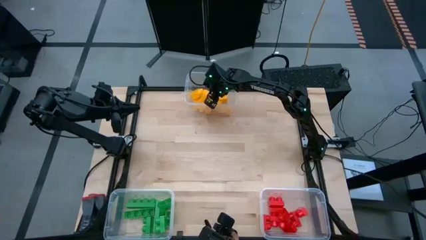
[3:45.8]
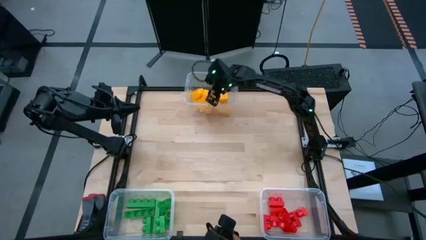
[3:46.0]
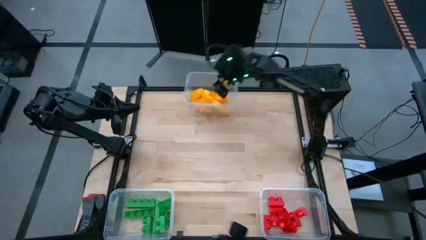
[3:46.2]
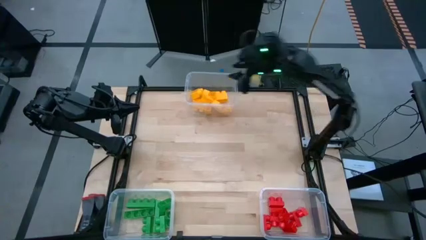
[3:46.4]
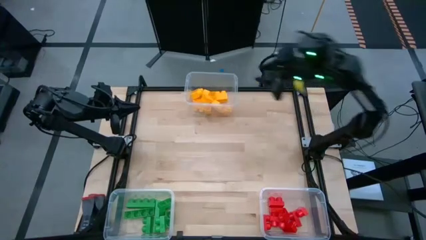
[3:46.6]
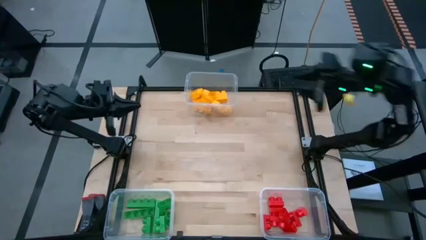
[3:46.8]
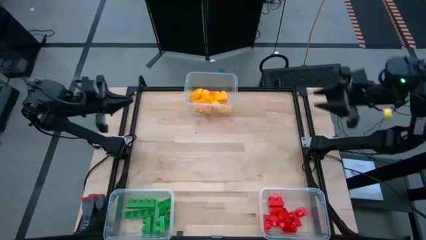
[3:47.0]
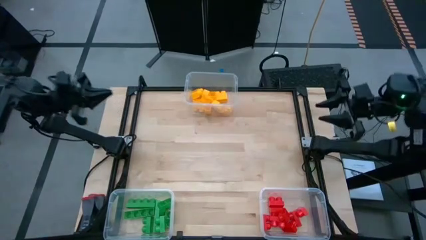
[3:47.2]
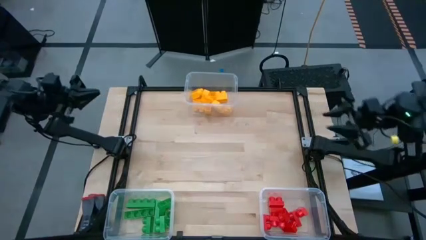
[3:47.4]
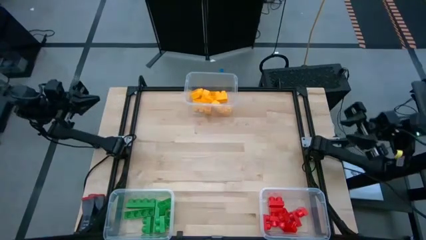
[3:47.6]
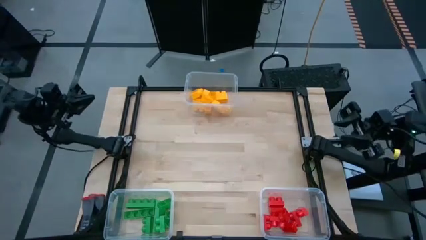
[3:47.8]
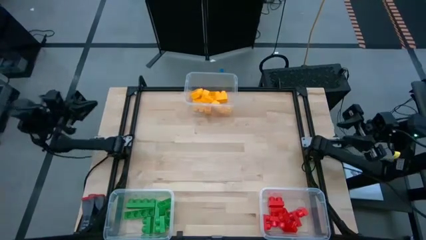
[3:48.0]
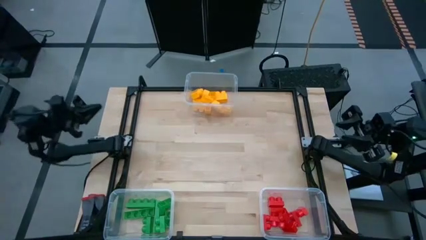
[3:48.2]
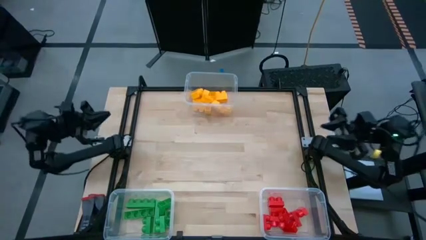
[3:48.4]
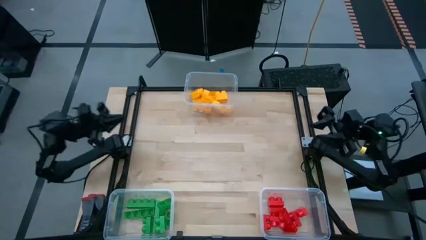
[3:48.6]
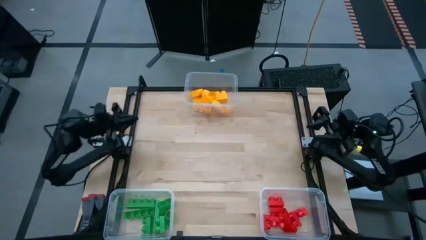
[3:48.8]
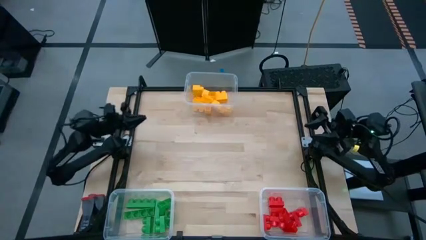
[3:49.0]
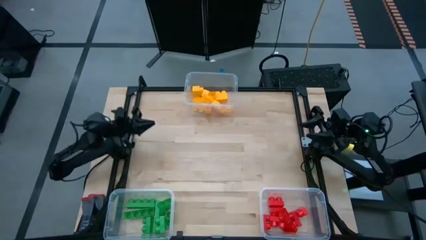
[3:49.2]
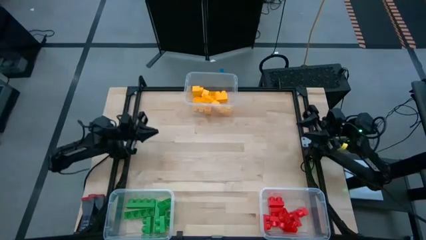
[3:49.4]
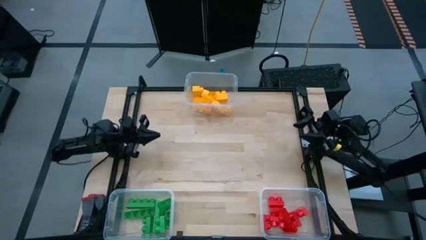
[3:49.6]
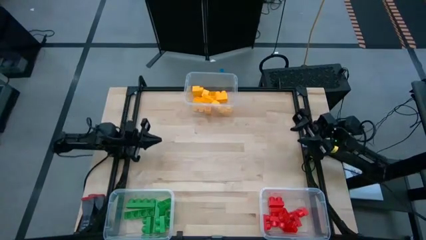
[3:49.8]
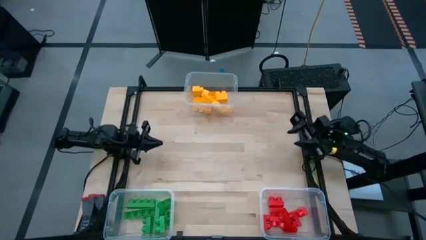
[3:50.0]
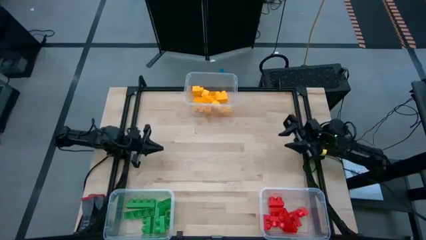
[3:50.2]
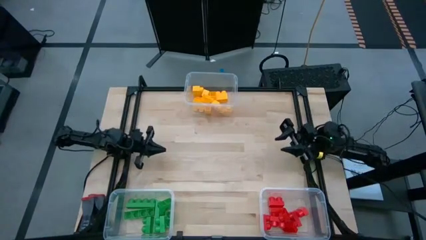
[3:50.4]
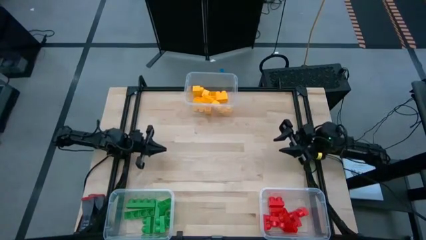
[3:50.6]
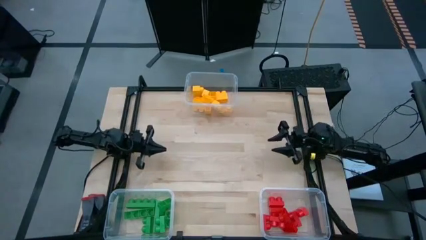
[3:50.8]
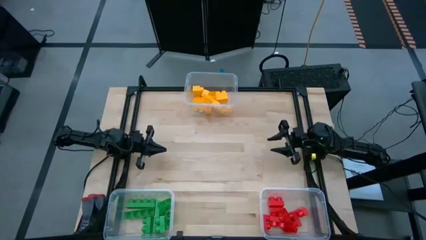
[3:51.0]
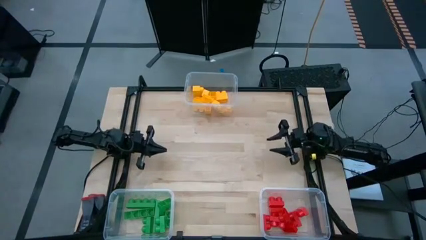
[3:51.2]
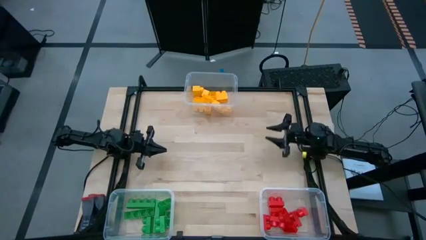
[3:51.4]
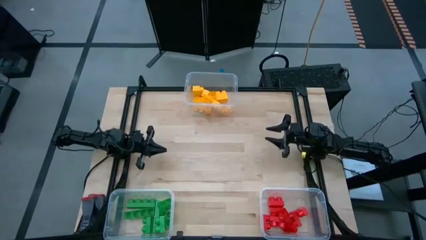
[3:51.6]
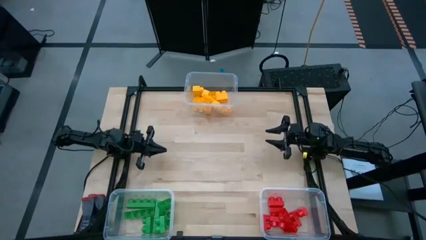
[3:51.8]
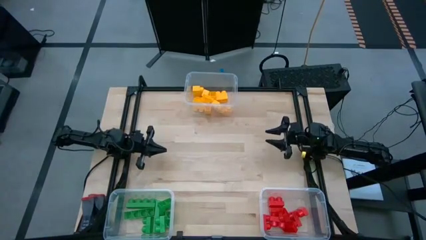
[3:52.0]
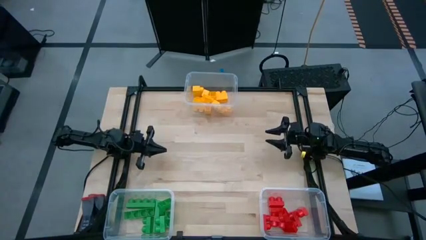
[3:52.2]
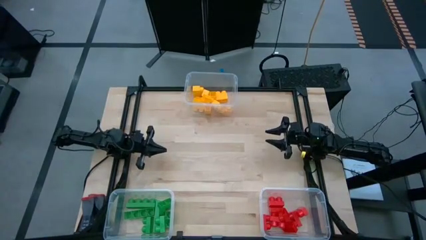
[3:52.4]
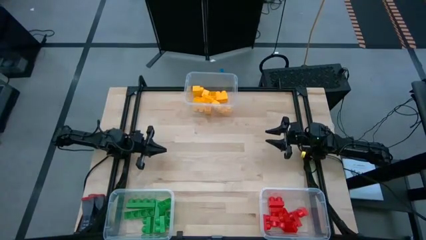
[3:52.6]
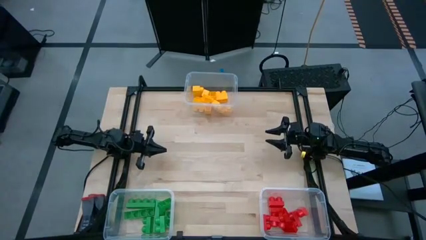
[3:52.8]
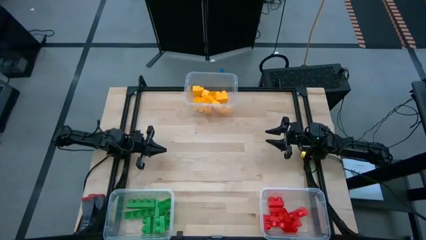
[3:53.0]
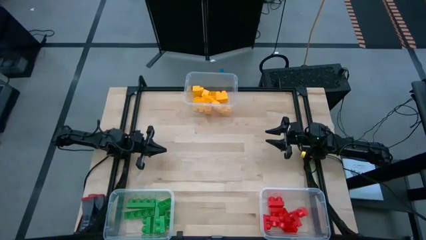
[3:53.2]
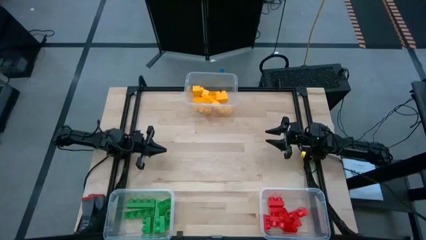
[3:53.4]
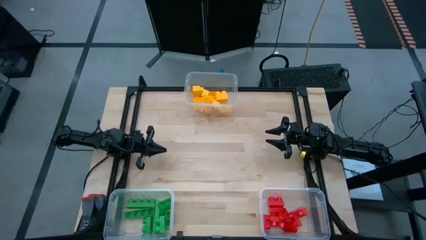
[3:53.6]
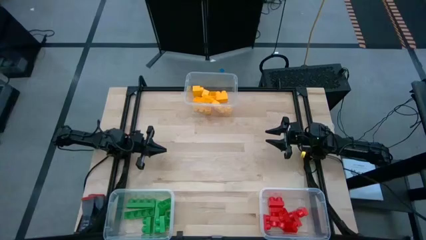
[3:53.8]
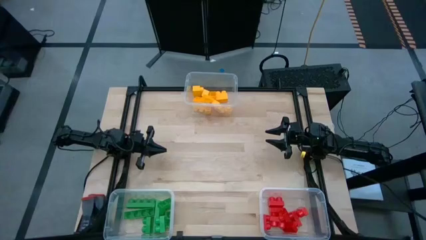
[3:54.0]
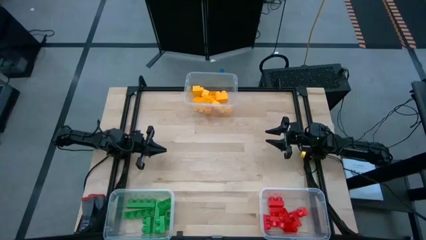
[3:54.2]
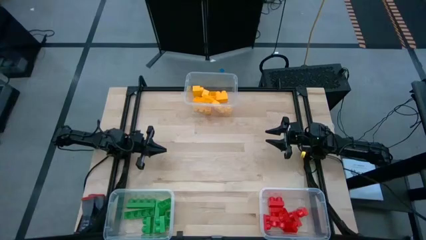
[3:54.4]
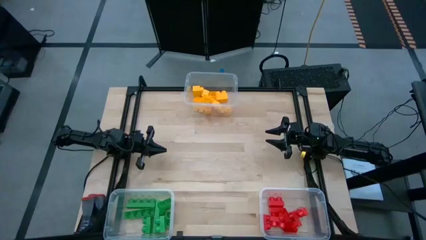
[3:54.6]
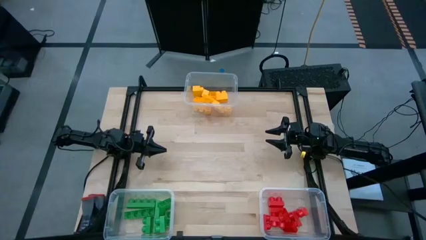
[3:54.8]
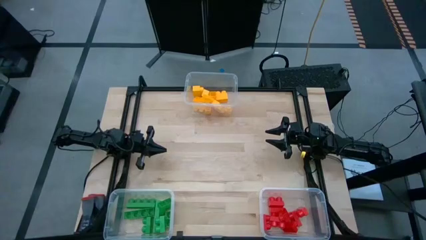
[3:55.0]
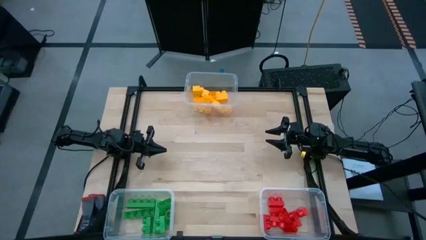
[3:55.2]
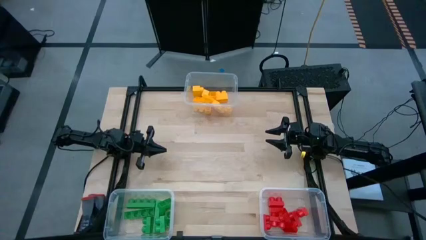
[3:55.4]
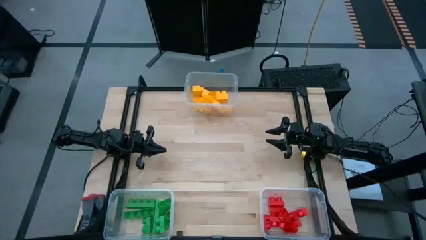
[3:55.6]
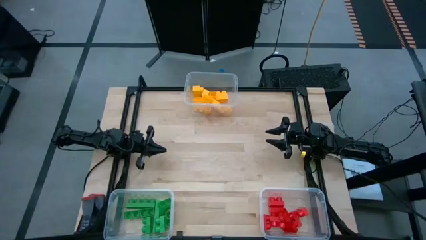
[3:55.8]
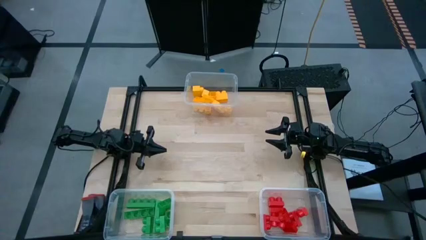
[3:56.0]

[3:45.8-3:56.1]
Task: Sort blocks
Return to Home Position

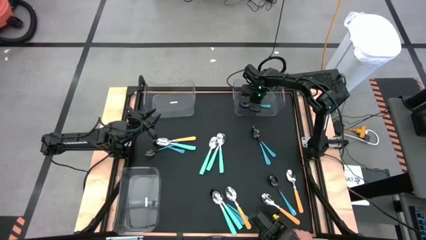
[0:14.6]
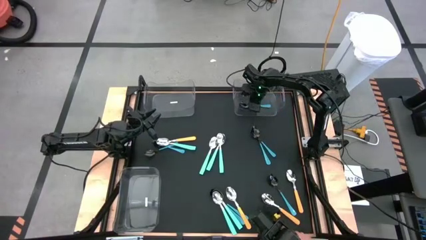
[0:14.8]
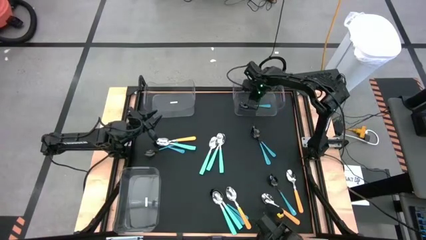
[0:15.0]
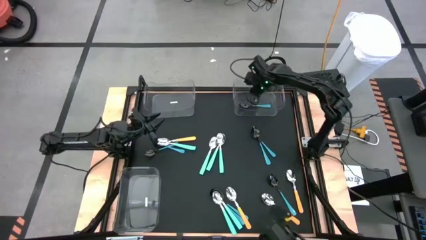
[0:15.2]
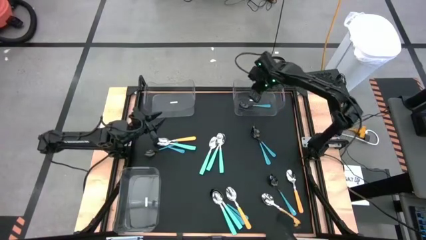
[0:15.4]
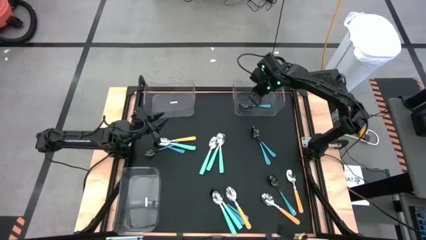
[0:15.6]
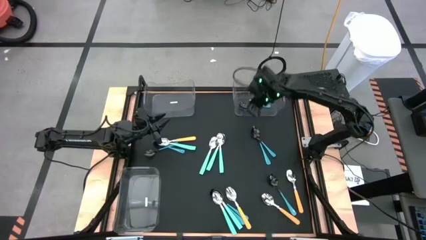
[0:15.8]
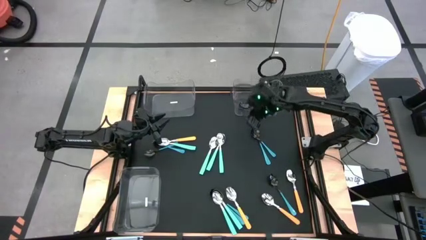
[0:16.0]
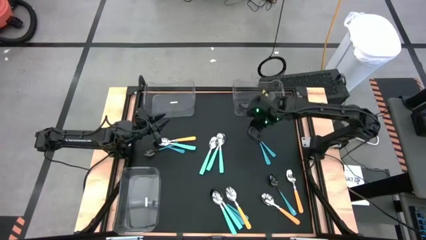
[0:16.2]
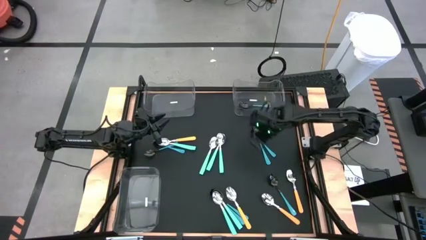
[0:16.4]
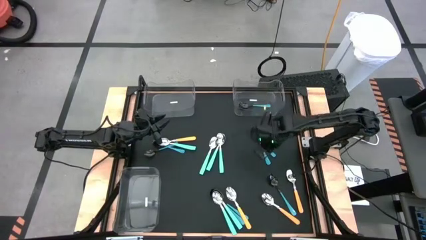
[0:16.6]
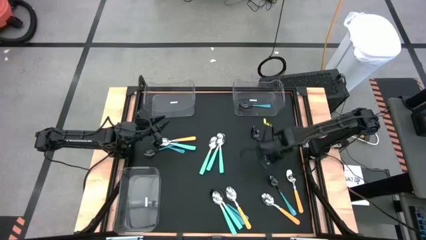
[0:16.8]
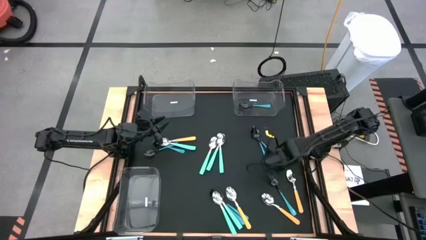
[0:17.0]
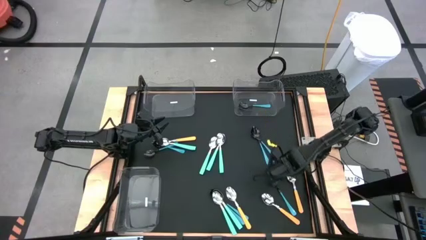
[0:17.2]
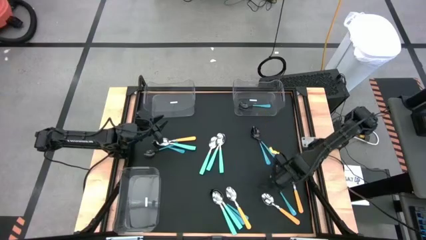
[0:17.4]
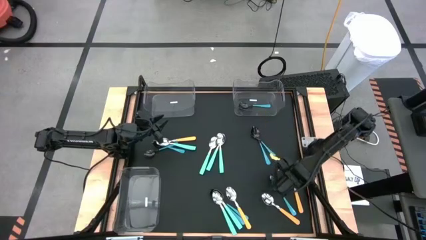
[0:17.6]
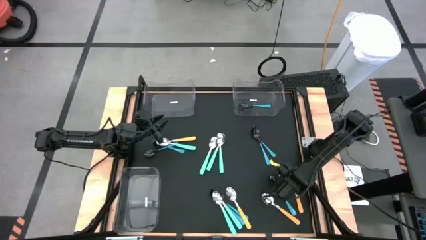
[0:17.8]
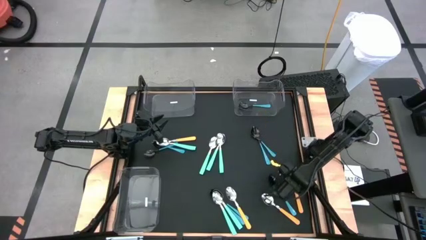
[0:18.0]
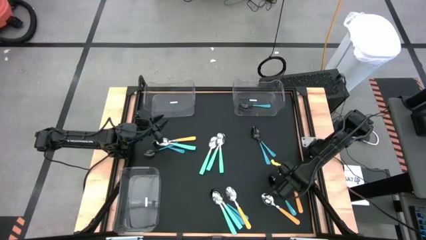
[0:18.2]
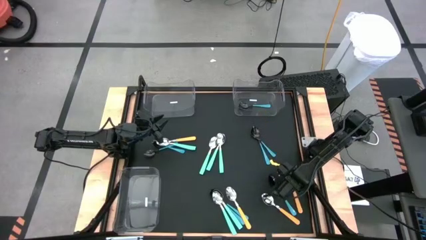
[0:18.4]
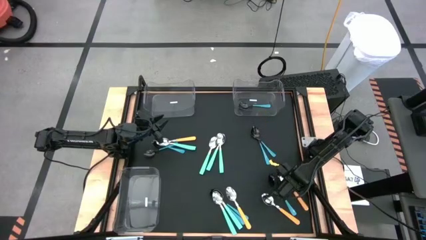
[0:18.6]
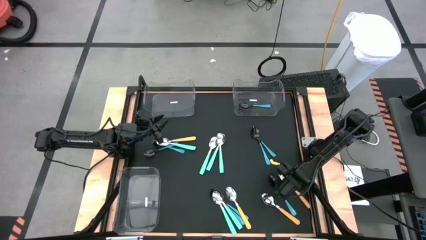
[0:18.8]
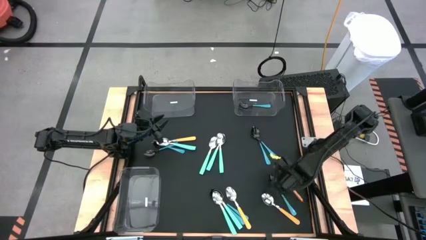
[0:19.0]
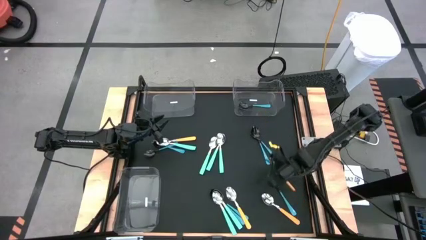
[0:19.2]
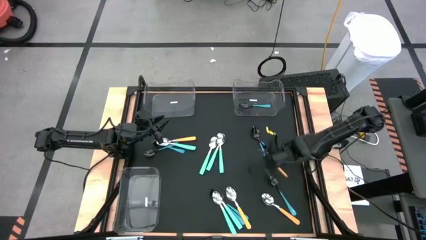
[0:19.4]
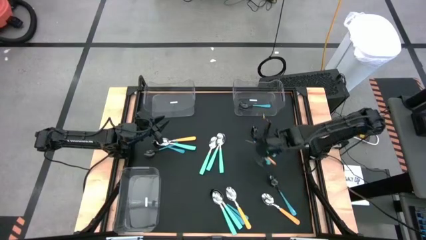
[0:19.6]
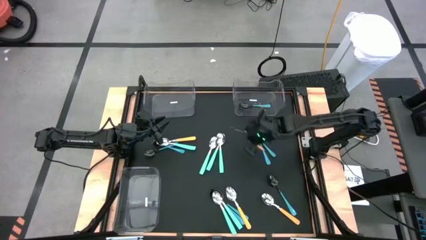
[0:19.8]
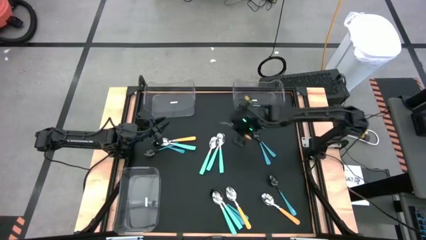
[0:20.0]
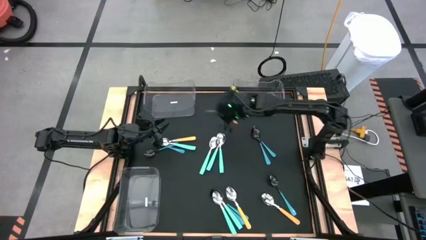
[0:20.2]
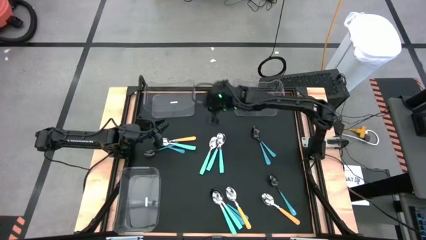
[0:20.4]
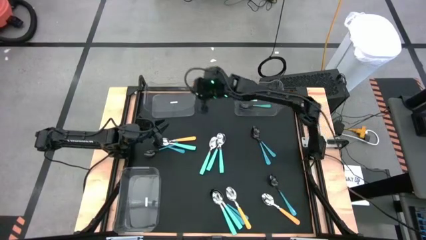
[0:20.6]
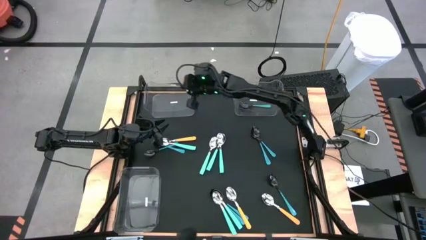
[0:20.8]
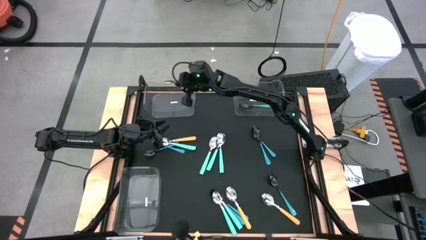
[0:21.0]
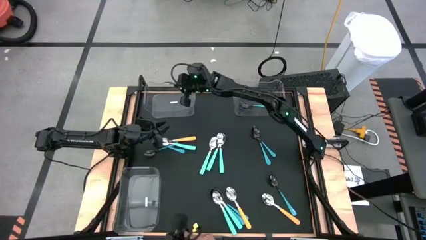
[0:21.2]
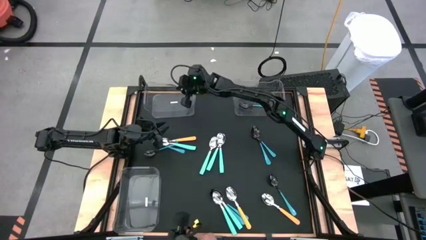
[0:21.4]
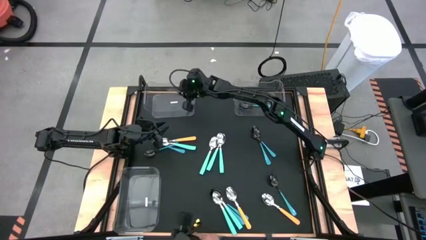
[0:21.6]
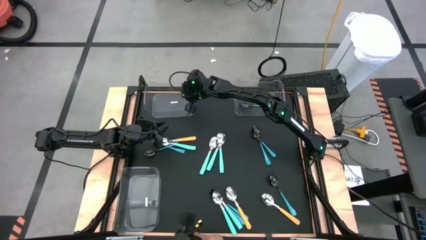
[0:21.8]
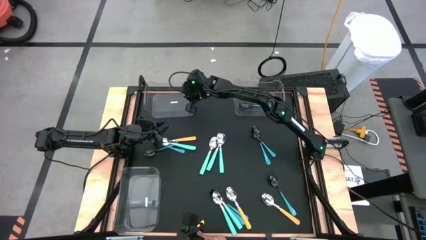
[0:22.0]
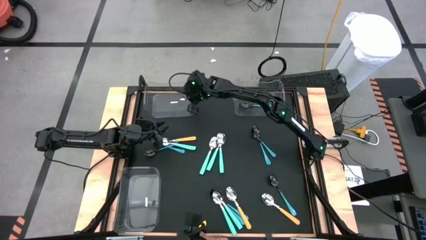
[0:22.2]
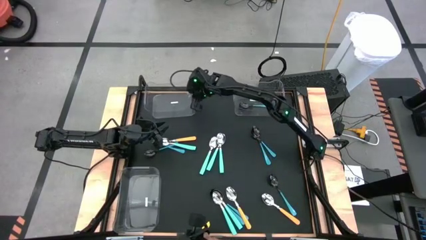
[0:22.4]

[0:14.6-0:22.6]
Task: Sort silverware by color (type)
Put the yellow spoon into the top left transparent bin
